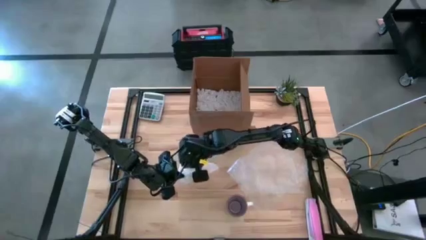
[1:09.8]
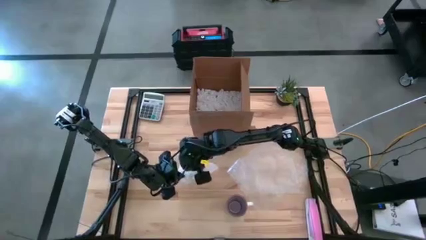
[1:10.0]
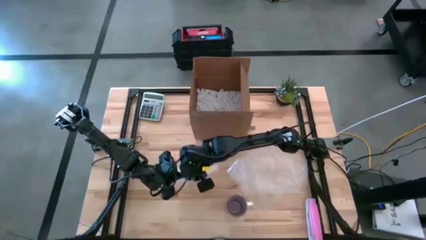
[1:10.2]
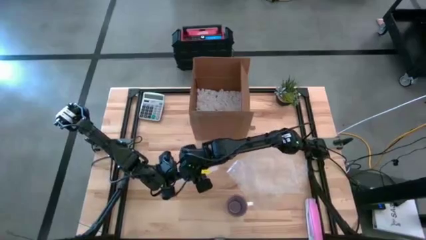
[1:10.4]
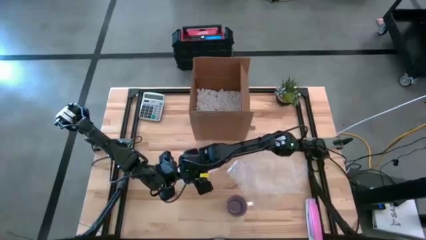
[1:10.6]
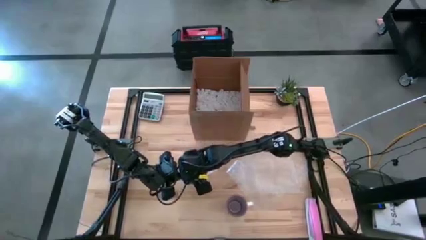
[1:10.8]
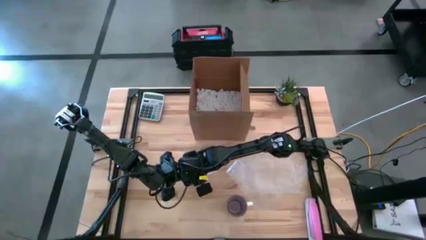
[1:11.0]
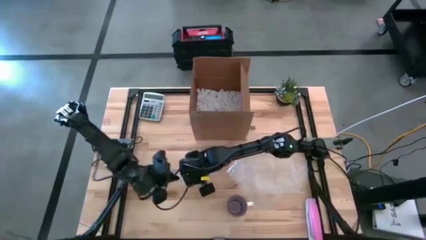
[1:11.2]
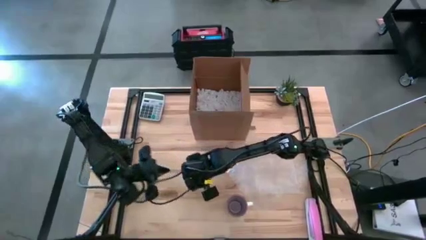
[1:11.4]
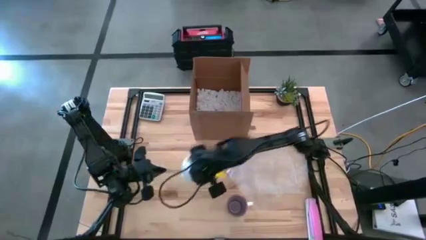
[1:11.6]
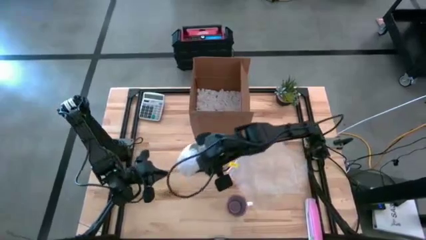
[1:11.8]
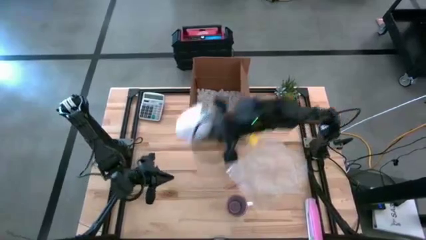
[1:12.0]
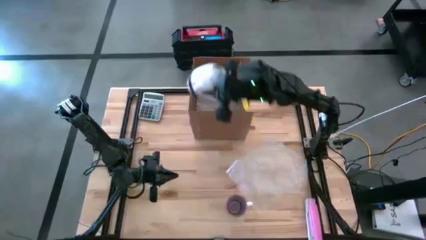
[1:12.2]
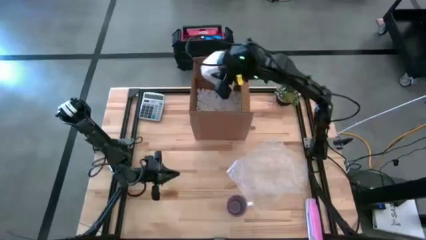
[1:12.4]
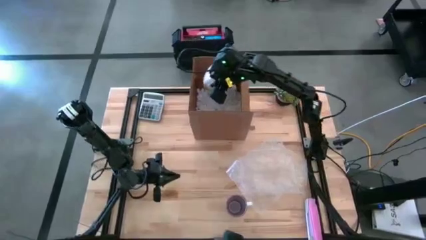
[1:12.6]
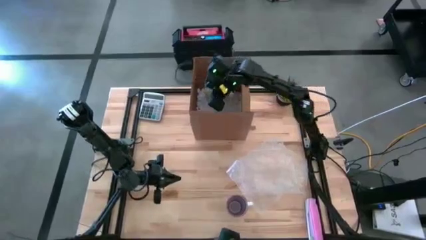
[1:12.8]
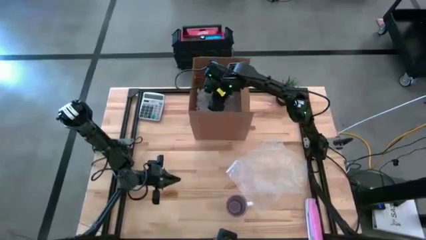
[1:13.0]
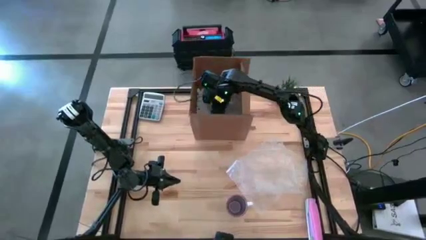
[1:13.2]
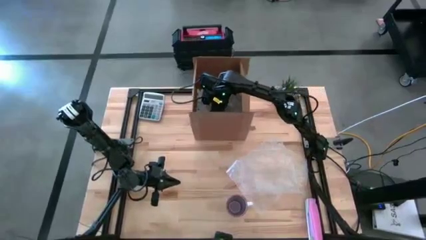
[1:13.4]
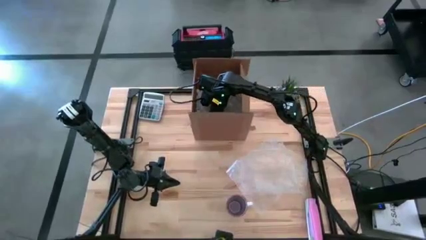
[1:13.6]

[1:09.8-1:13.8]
Task: wrap mug
Put the wrapped yellow mug into the box

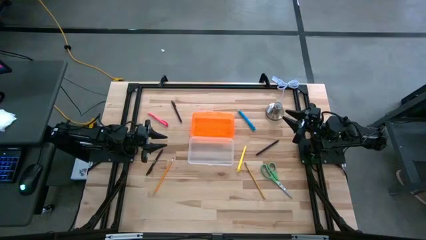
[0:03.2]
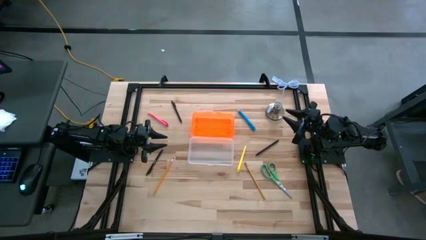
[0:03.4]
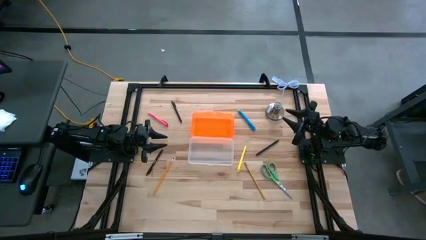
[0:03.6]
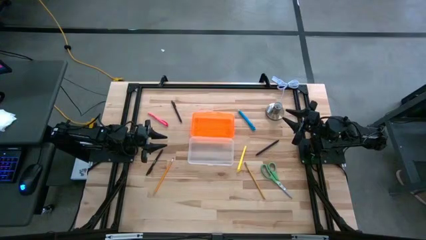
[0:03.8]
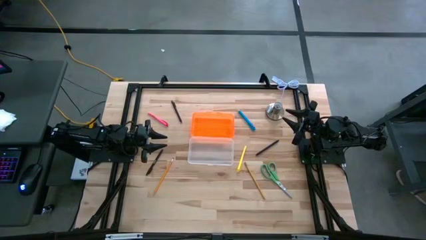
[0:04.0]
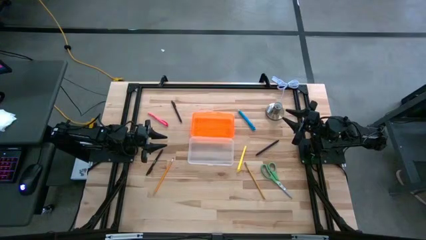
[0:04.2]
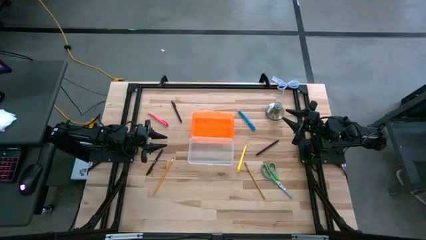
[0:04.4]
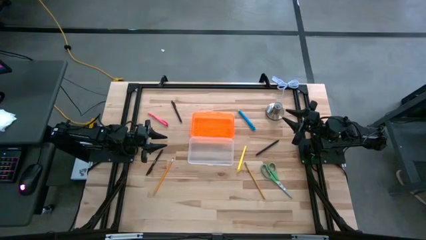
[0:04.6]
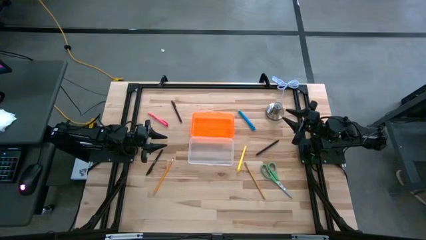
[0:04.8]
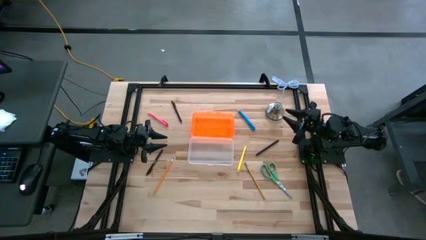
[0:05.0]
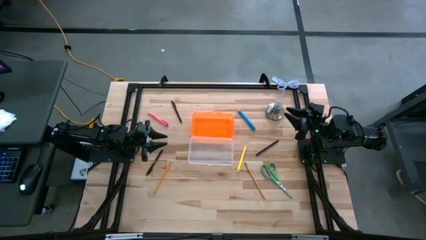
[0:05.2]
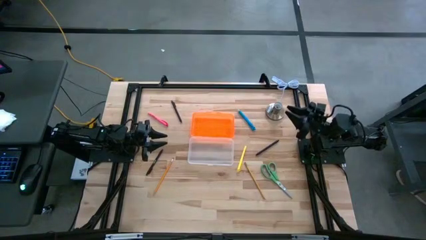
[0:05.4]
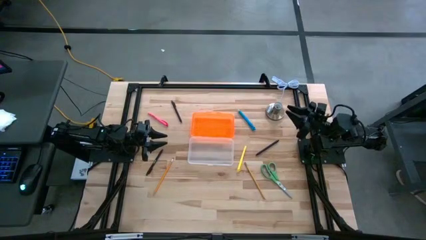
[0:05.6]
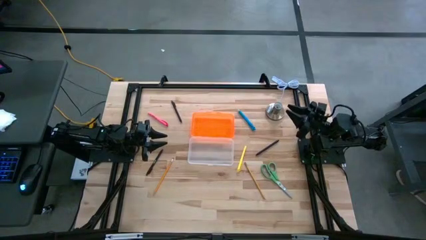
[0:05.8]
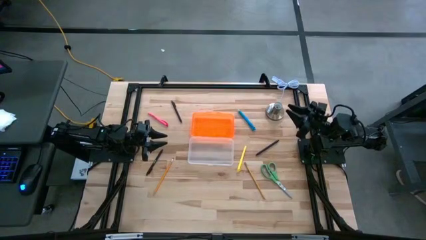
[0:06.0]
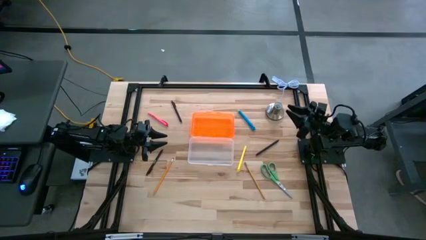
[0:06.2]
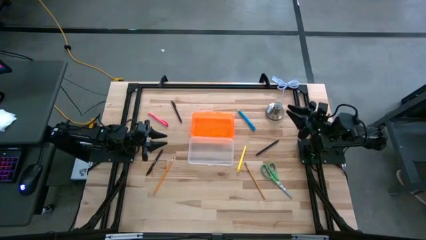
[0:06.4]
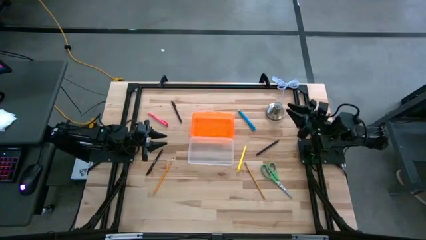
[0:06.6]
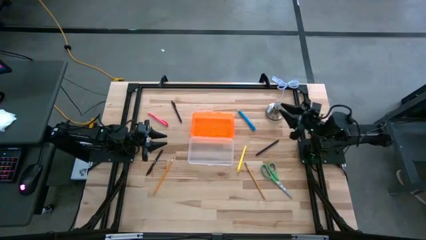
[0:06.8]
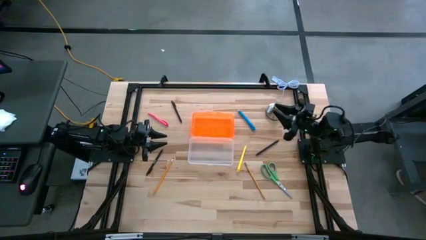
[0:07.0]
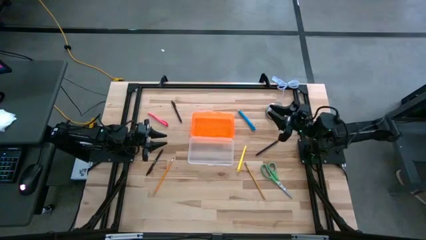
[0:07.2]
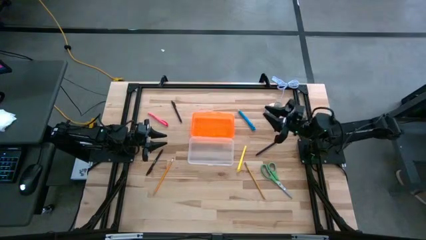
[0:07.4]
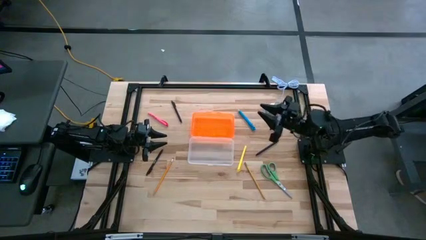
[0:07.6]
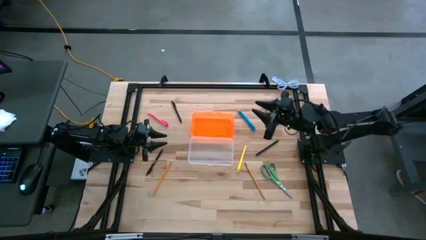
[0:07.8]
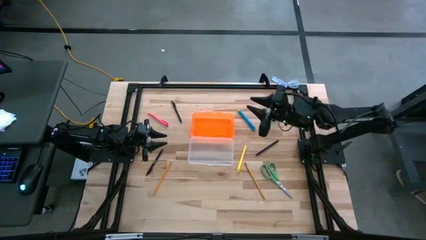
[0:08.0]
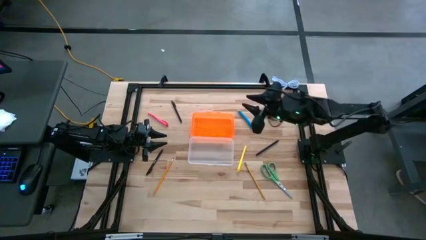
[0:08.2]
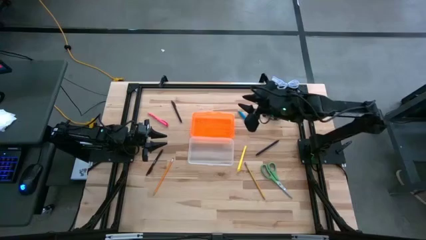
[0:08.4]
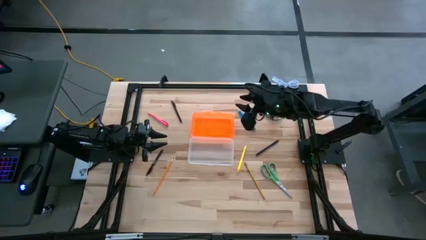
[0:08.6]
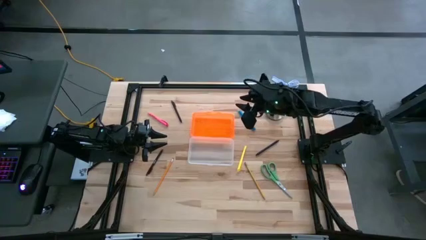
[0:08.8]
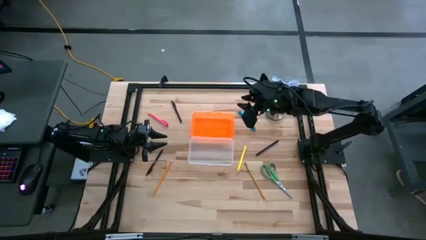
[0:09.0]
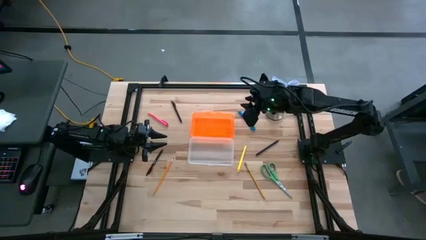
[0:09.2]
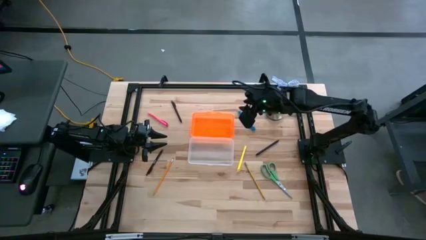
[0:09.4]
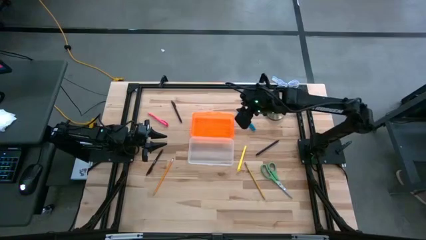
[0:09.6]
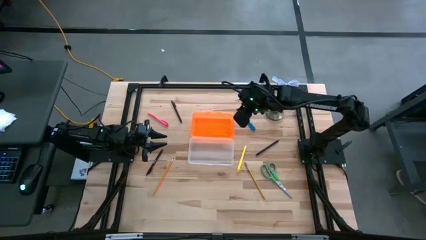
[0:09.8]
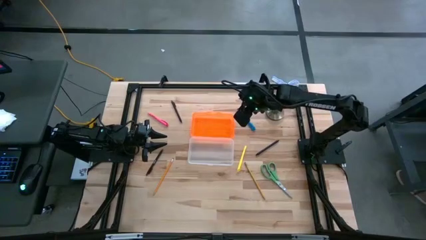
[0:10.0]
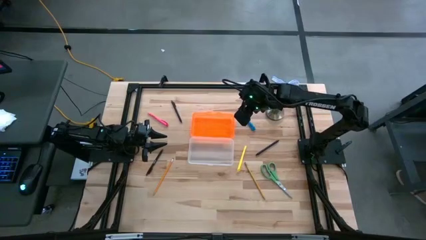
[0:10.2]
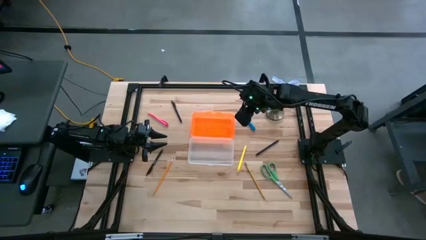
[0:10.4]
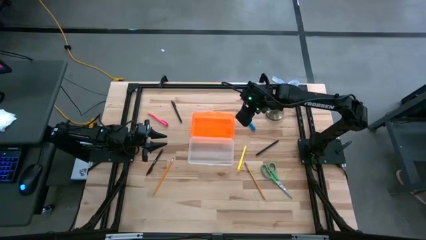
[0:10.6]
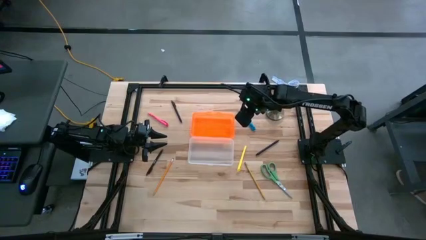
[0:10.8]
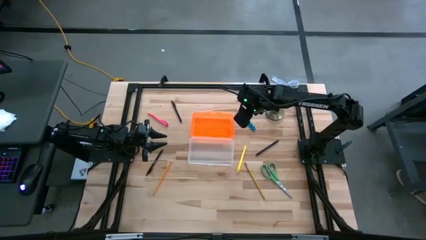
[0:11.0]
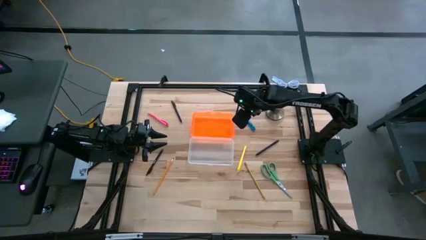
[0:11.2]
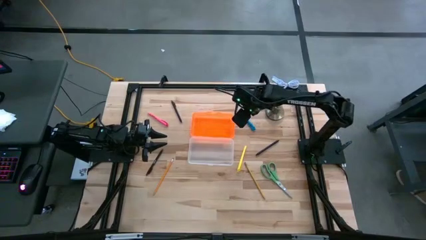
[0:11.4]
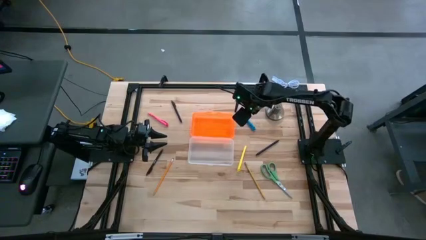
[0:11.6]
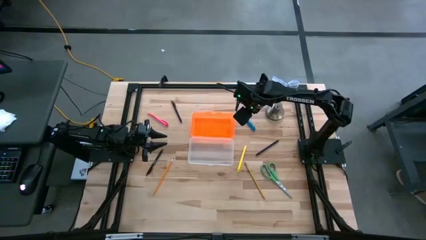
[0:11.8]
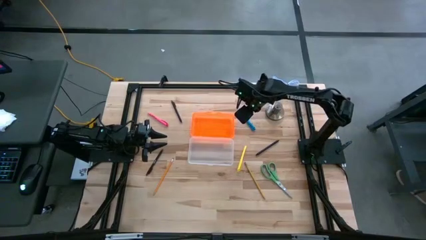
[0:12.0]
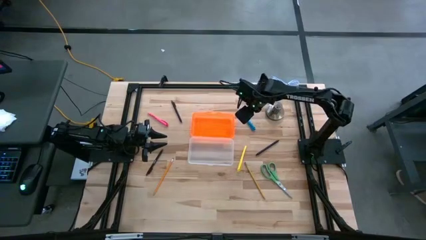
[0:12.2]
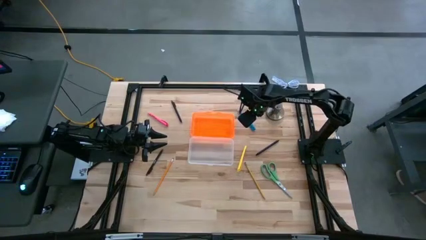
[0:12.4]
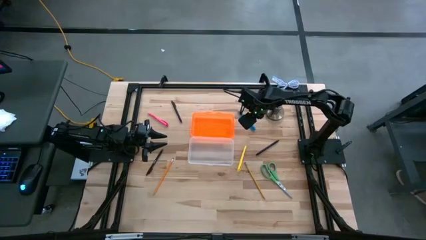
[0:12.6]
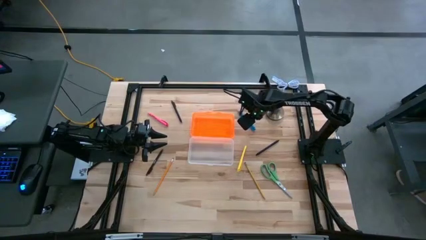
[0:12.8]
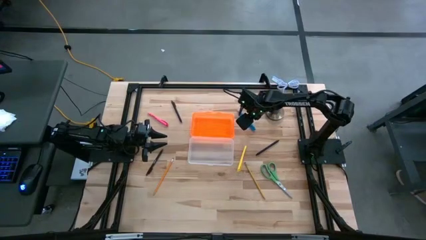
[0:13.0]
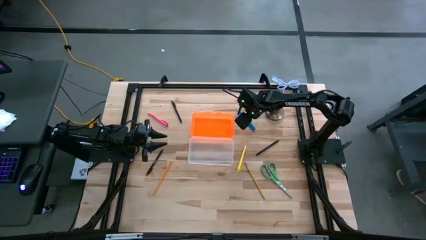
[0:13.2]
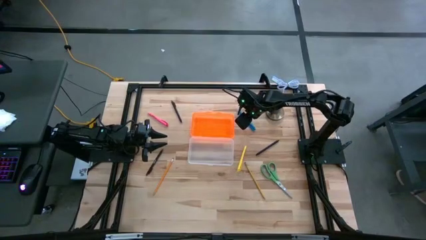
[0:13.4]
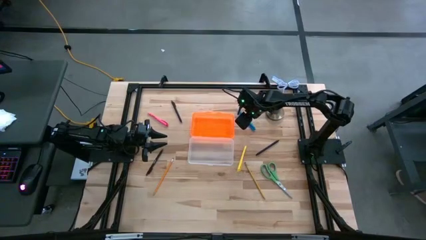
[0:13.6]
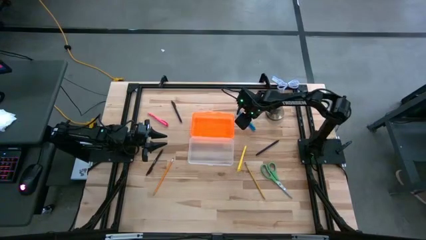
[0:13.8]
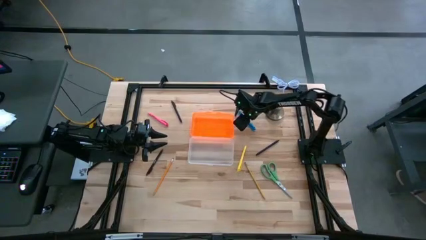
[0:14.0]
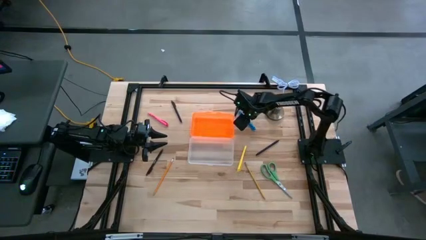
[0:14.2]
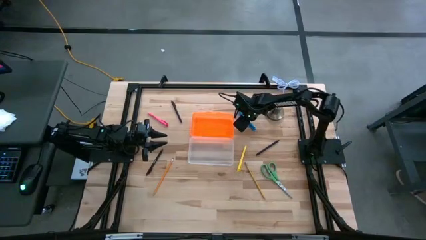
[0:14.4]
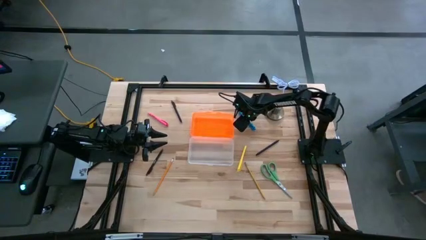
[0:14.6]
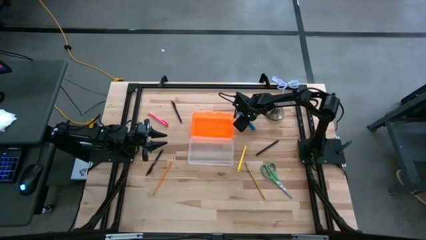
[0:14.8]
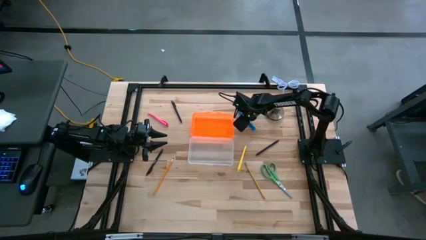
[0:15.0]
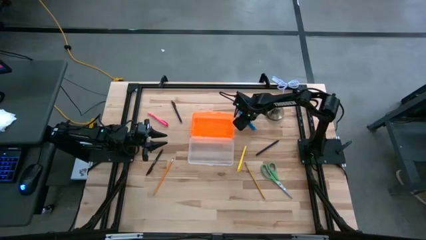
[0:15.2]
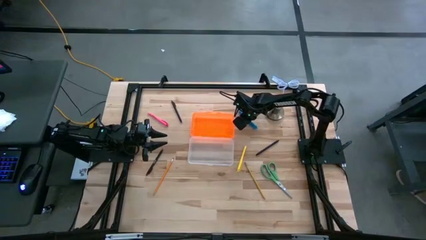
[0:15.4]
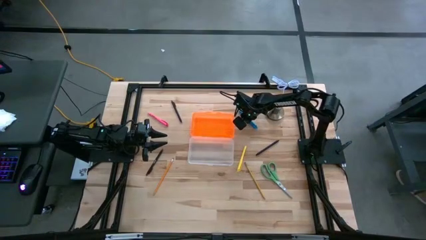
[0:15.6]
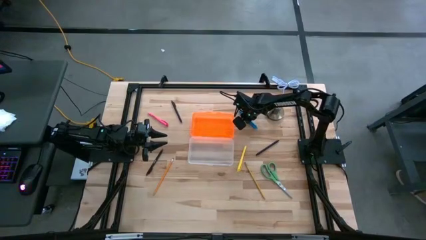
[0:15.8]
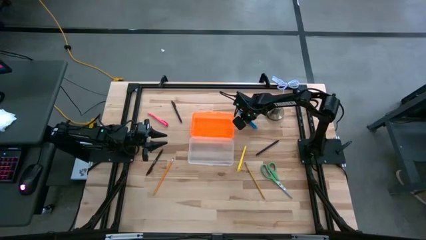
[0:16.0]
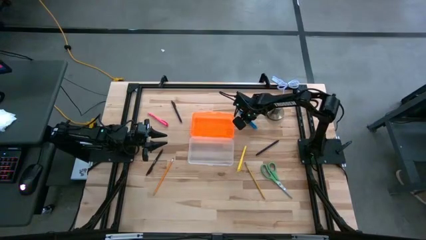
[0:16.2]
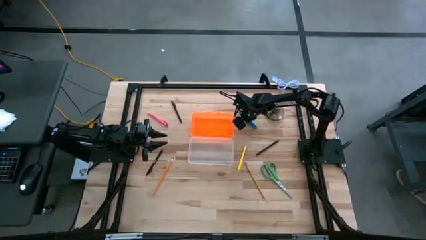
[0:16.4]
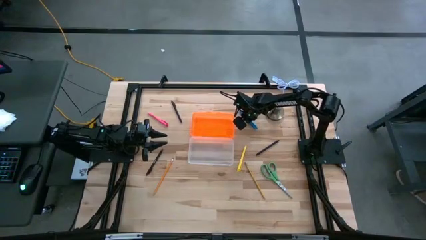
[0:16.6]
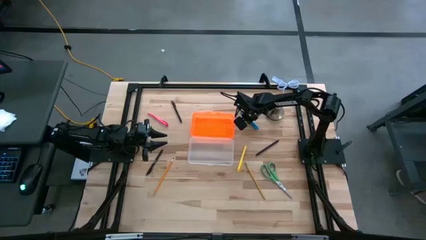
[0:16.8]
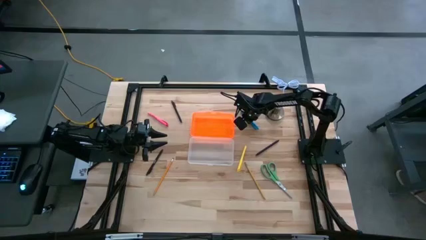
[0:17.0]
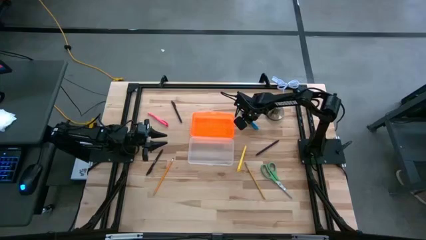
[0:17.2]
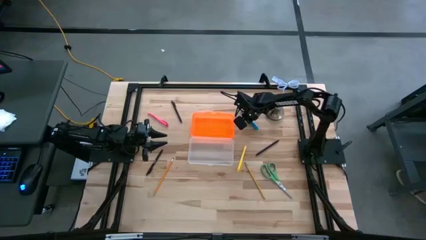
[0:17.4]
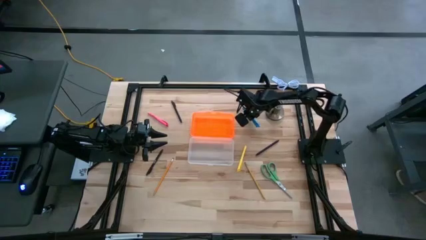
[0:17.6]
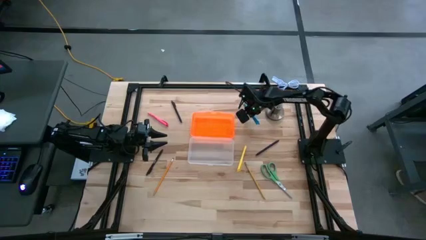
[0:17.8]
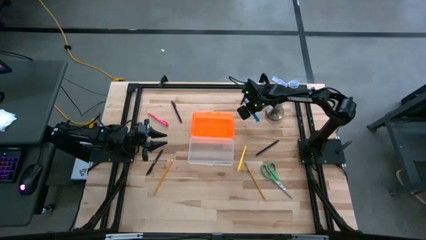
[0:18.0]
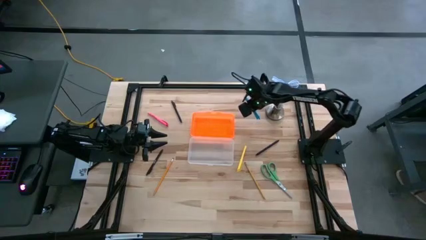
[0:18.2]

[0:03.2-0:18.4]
Task: Pick & place school supplies into a supply box
Put the blue pen into the orange supply box
